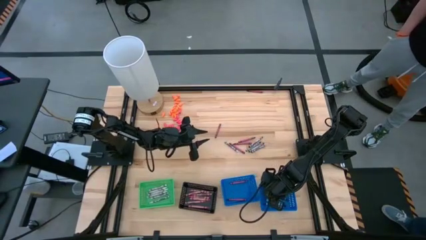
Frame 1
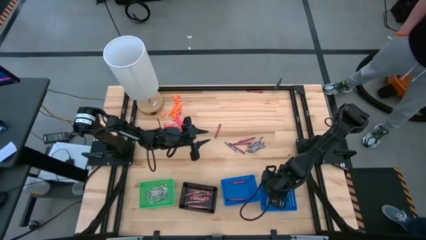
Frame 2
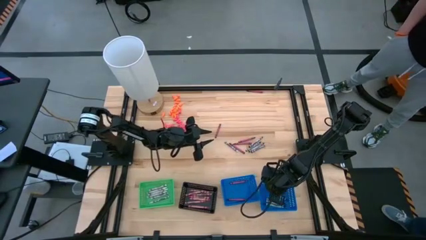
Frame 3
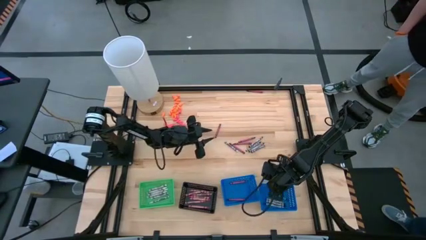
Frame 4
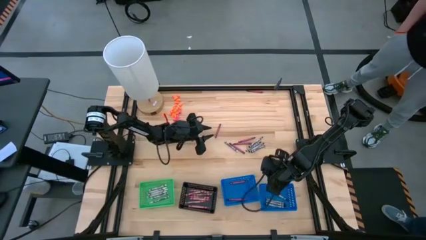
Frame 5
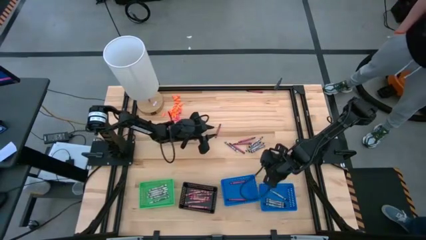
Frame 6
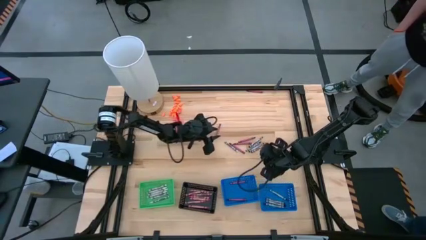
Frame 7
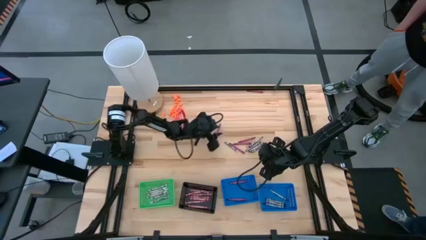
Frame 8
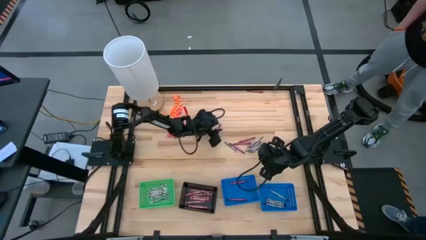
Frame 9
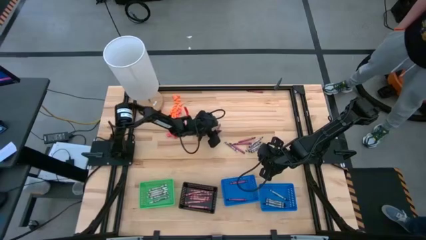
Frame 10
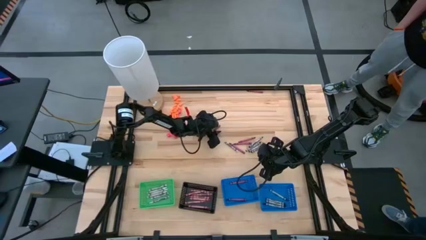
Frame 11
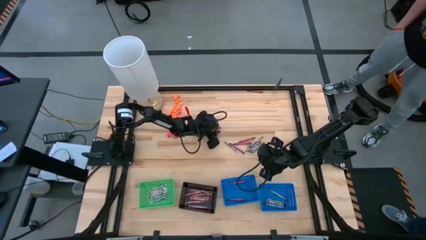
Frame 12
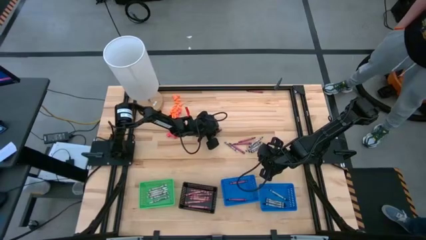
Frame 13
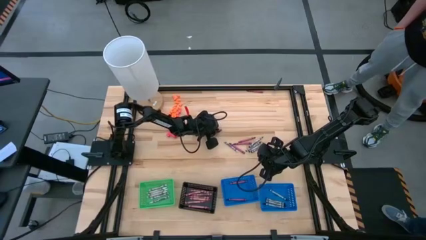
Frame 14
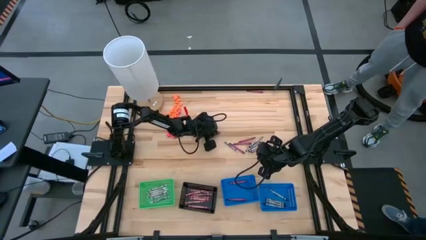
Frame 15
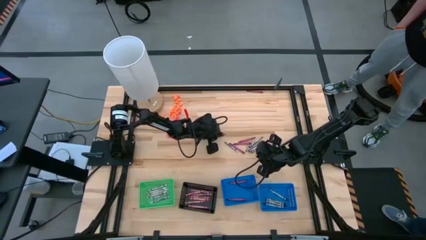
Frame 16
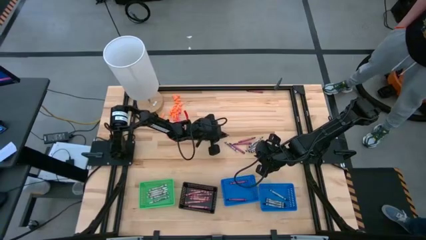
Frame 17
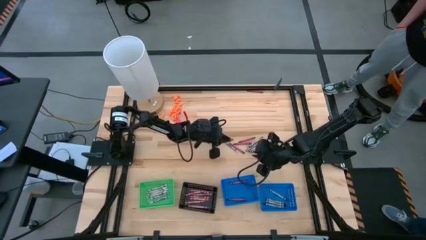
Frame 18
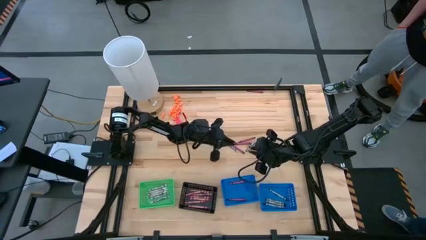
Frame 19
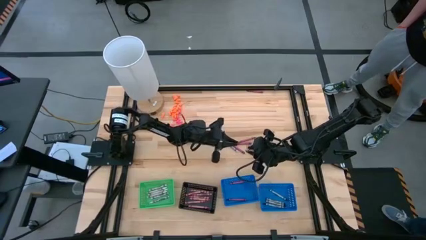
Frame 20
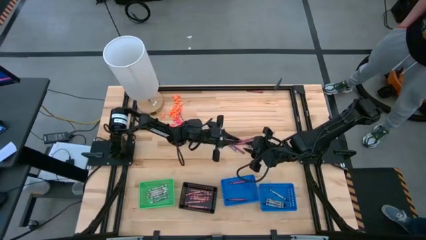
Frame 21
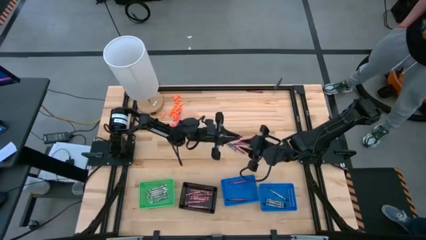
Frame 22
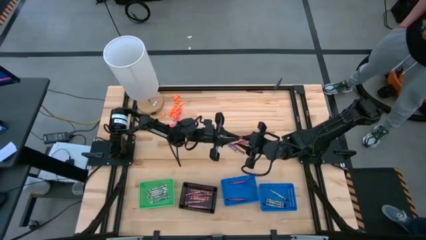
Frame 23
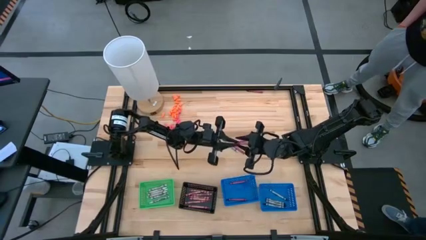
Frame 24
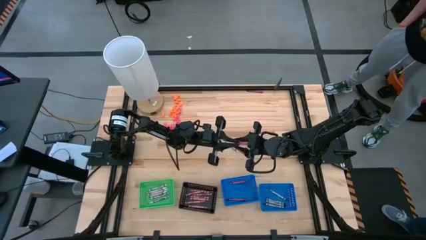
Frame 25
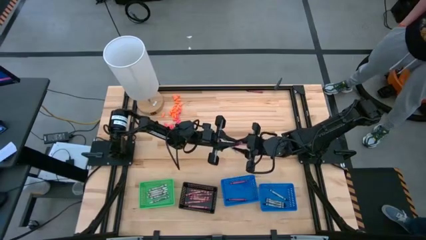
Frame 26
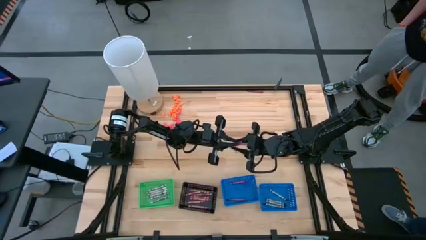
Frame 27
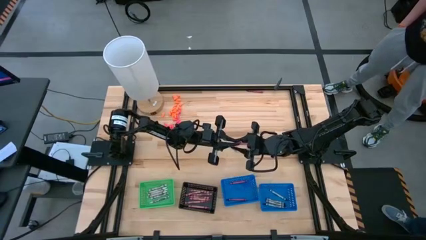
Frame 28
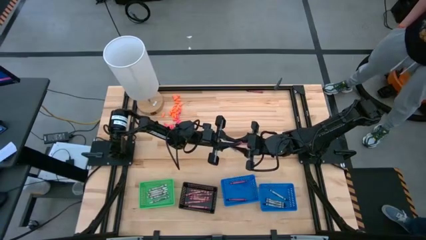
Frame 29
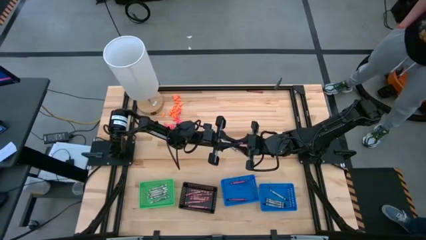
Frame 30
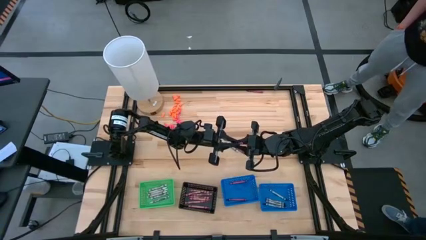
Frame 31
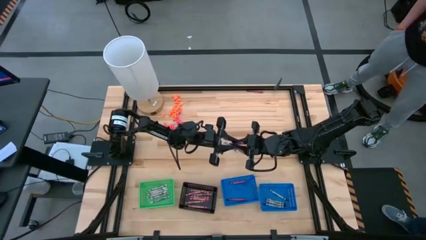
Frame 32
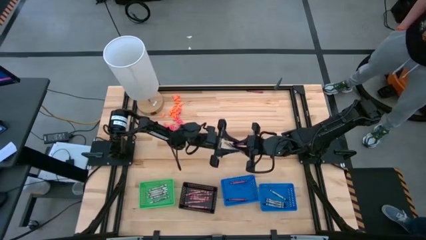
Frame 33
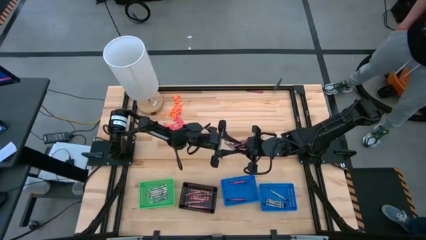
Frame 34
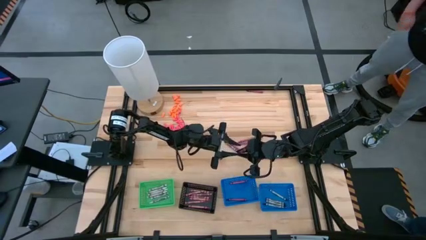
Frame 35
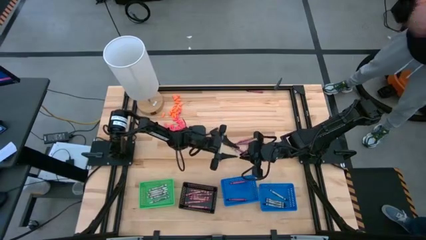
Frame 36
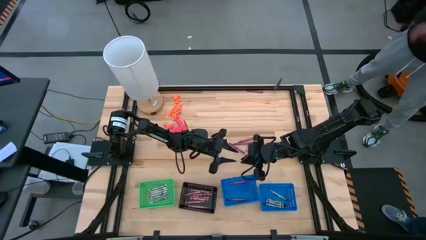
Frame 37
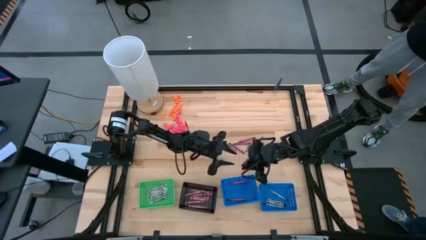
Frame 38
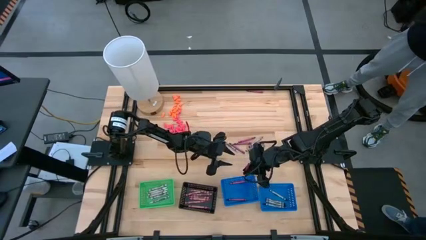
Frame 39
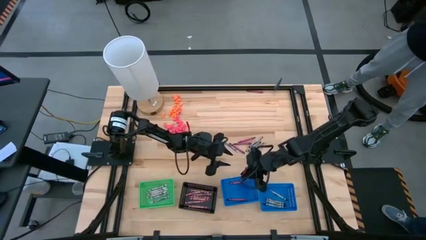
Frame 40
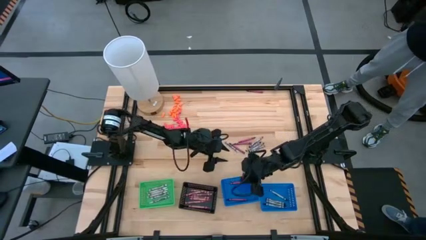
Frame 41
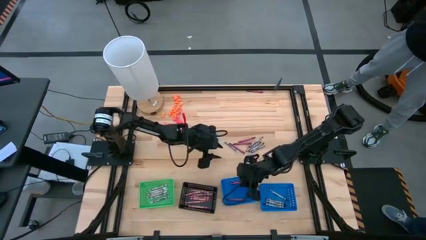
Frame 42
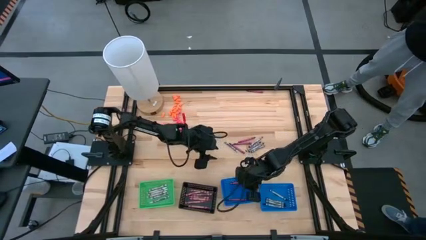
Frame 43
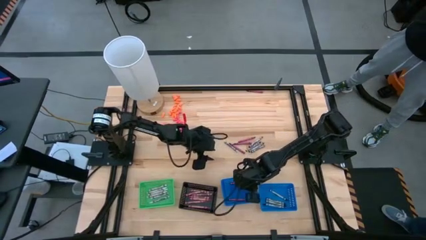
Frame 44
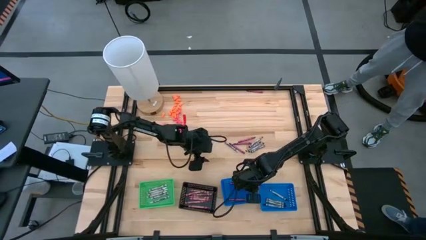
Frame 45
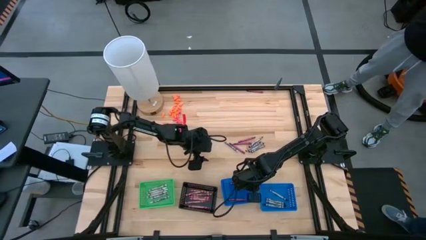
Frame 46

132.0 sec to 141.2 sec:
Task: Sort crayons
Put the red crayon into the left blue bin

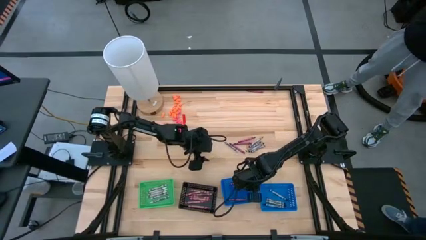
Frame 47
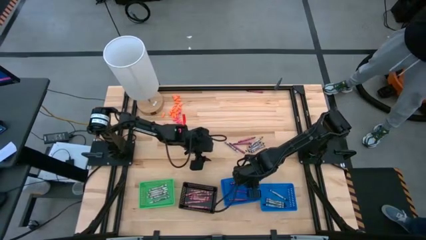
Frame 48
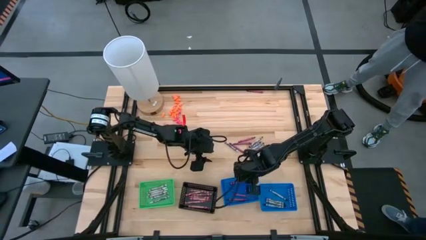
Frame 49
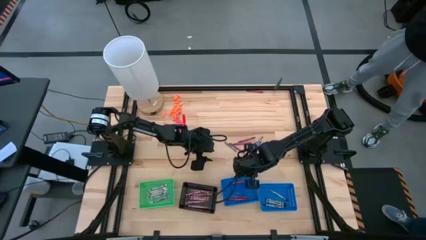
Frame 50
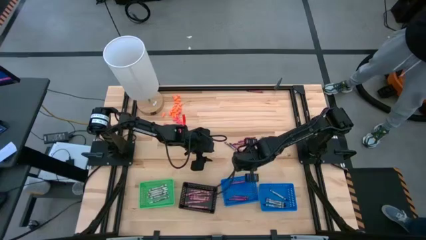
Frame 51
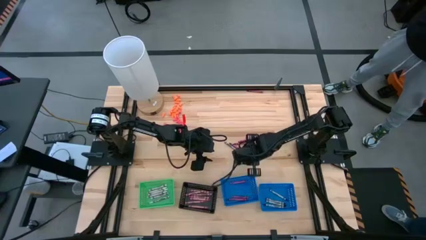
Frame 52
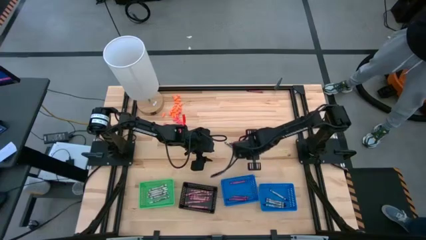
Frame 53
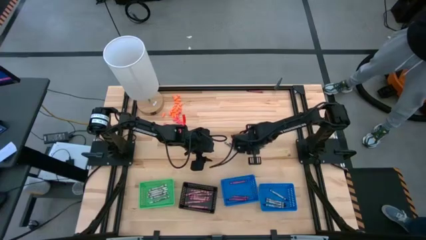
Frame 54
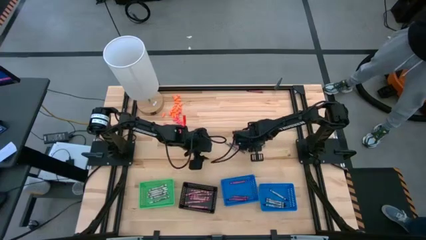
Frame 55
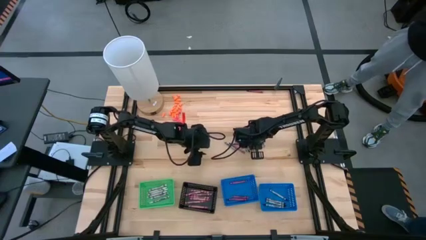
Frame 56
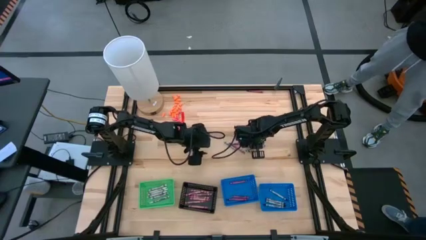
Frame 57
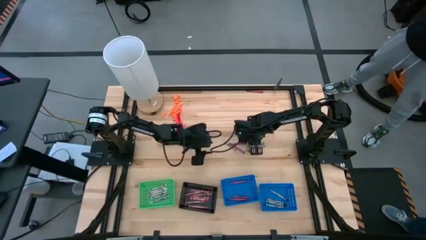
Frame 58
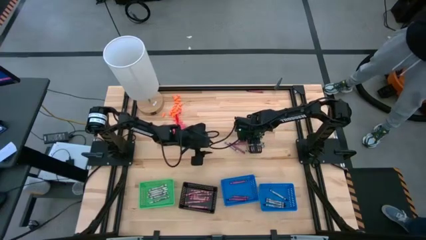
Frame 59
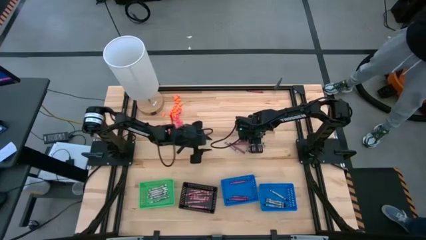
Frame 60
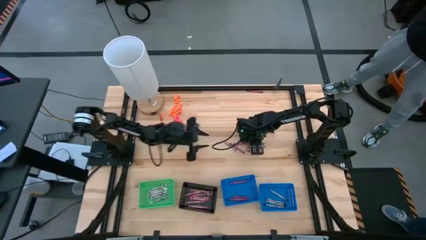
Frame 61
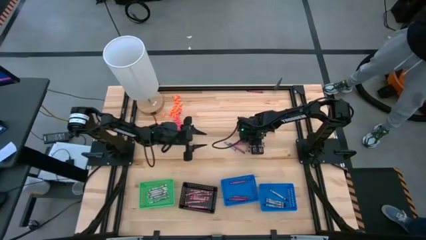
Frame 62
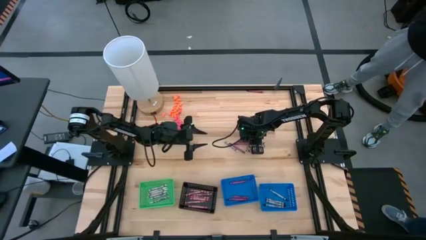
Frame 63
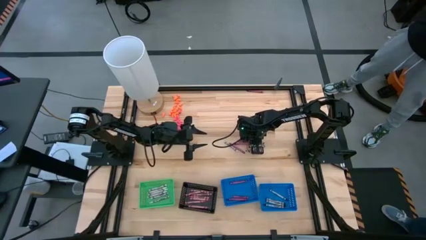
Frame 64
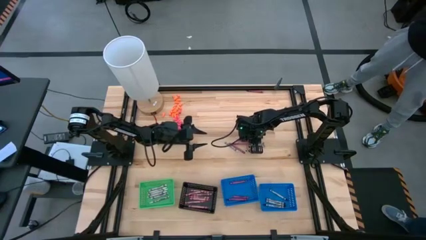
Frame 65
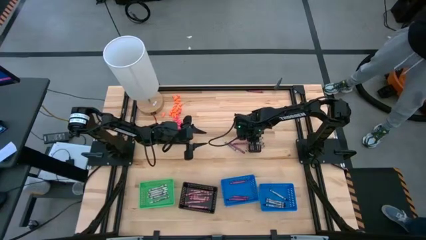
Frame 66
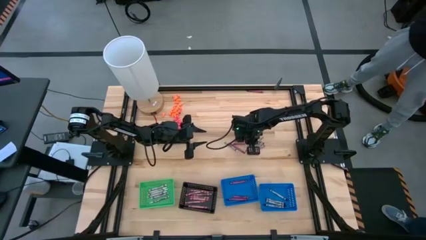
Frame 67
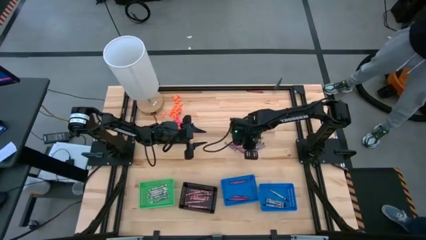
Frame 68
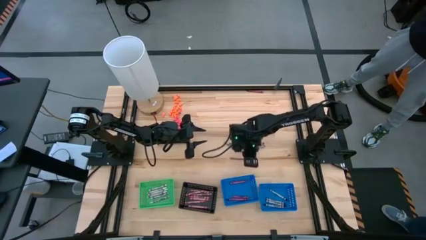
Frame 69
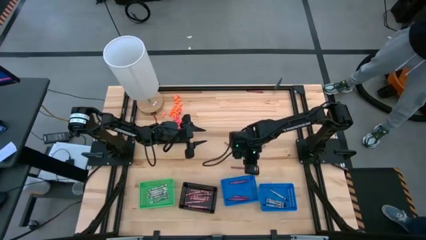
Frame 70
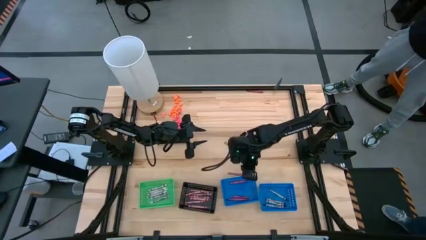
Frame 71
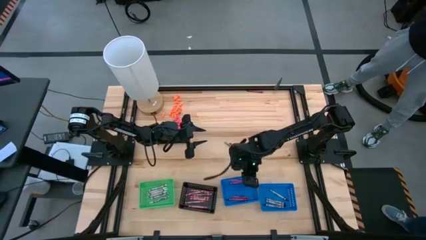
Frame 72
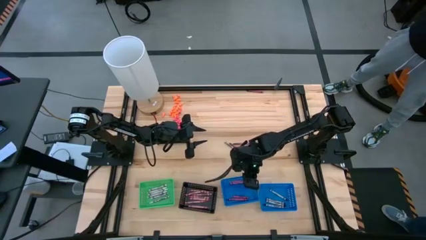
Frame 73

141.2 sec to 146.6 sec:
Put the red crayon into the left blue bin

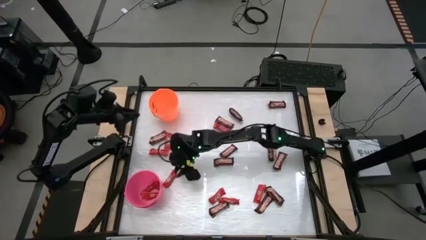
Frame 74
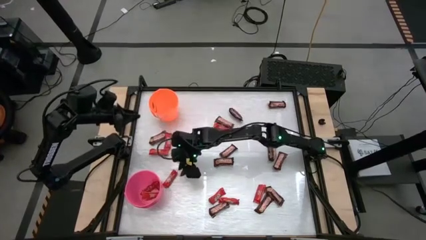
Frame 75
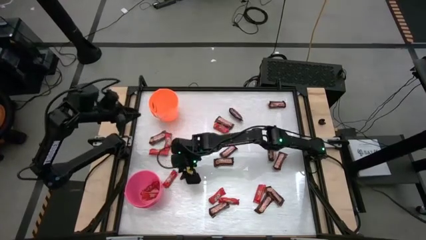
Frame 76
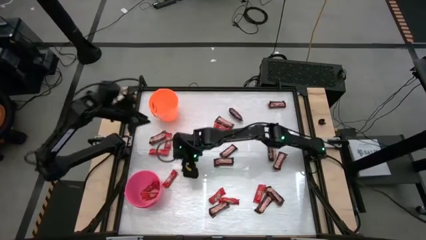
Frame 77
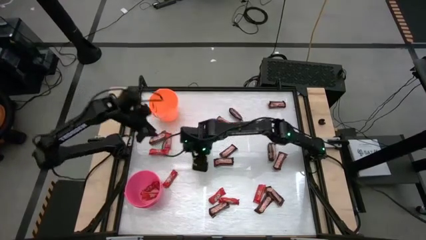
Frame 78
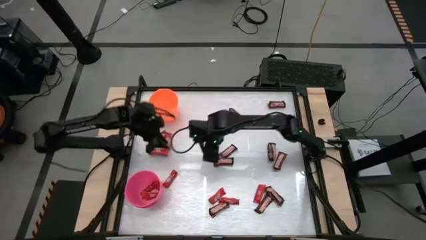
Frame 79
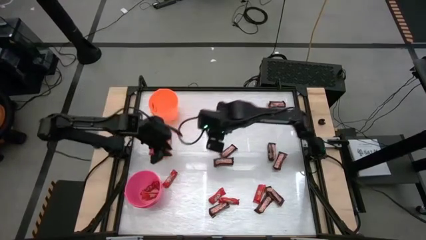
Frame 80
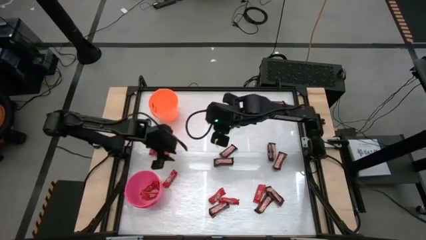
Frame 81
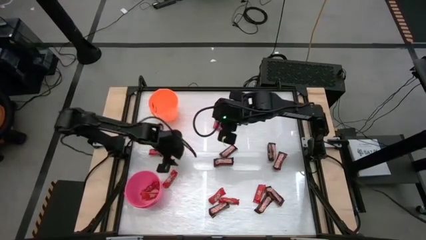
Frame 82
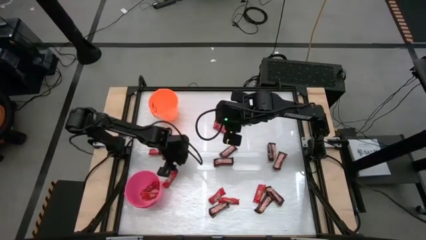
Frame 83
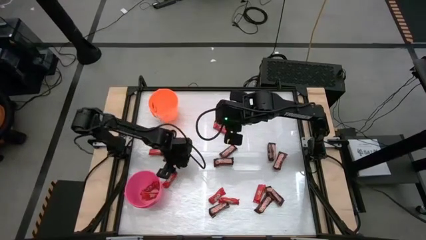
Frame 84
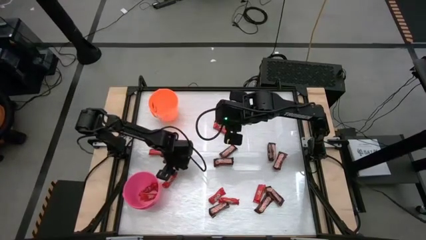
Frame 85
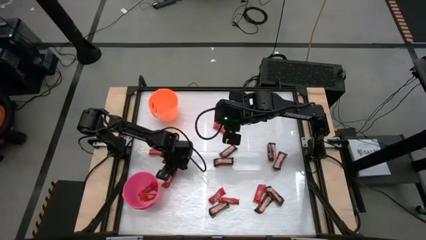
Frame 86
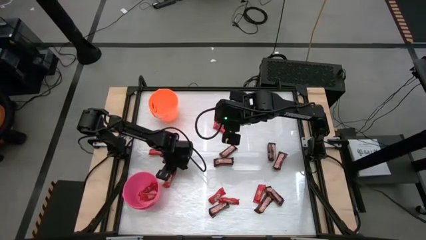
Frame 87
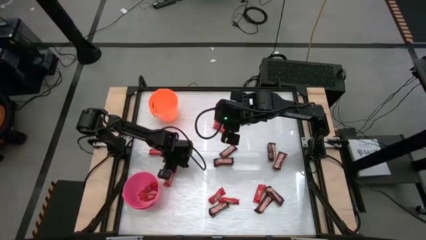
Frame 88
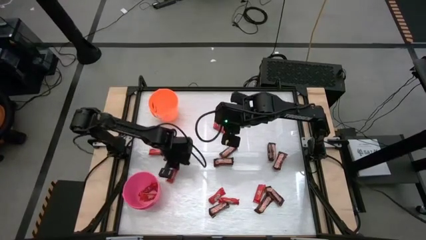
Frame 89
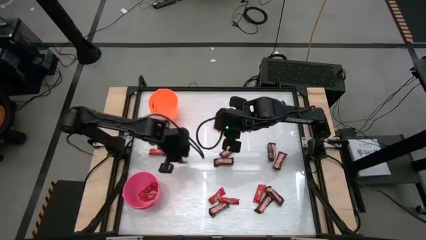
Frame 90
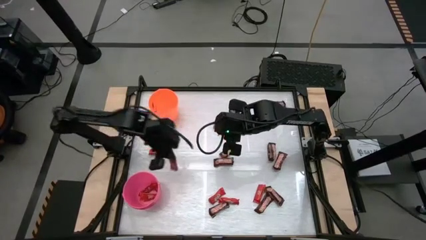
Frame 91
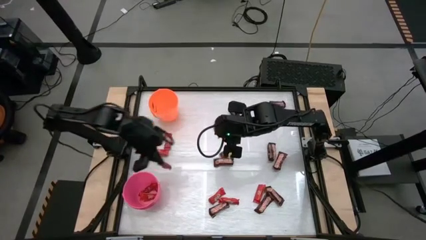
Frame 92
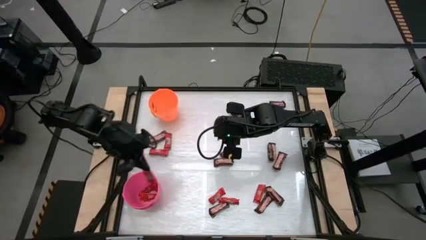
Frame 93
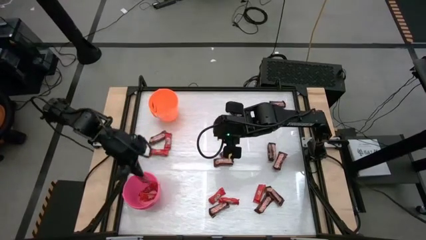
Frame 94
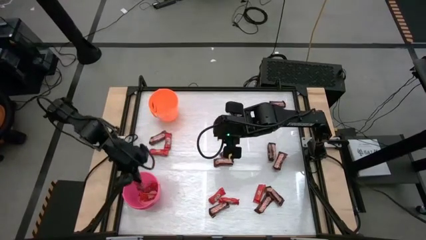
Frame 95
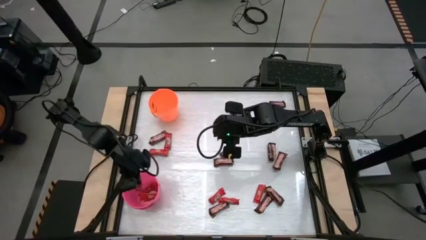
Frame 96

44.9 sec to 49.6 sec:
Task: Sort candy by brand, put in halloween buckets
Put the red chocolate bar into the pink bucket
